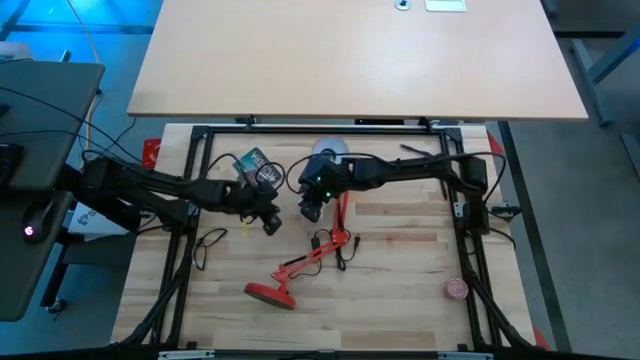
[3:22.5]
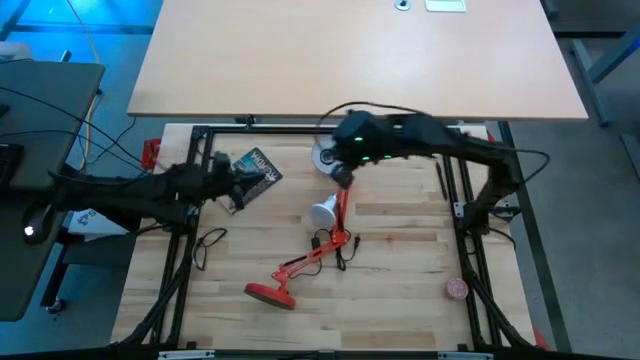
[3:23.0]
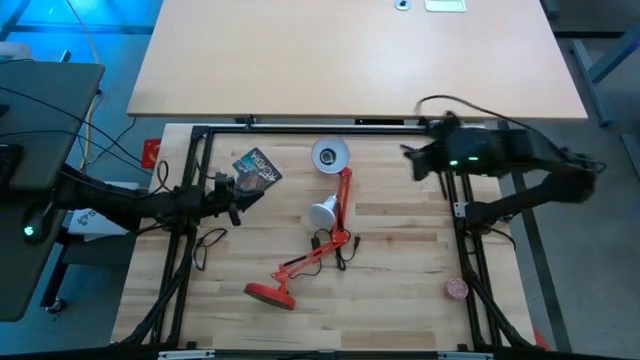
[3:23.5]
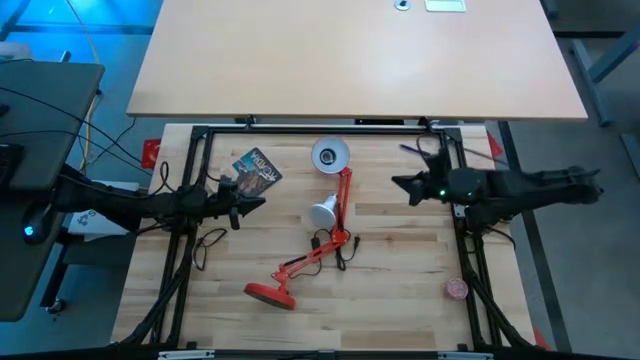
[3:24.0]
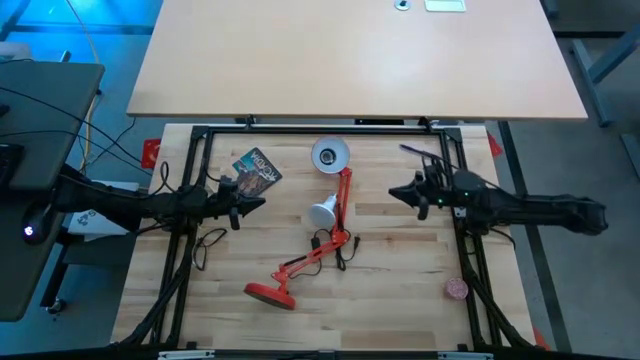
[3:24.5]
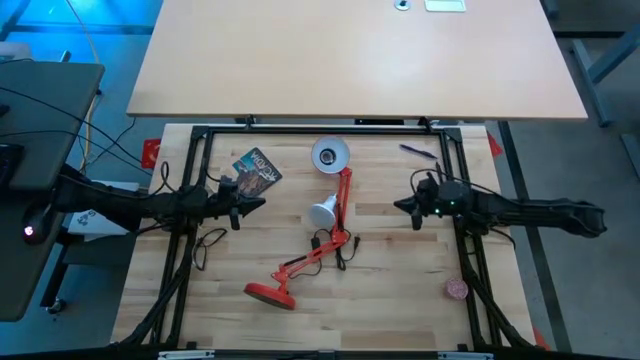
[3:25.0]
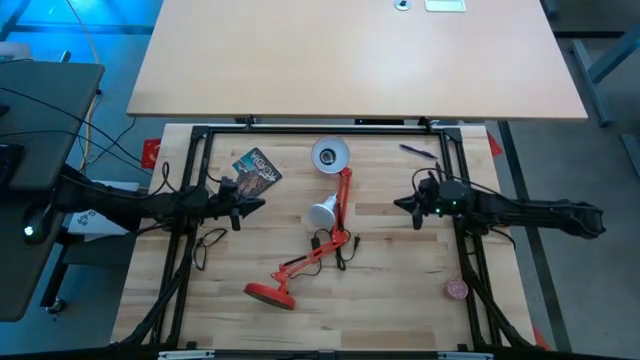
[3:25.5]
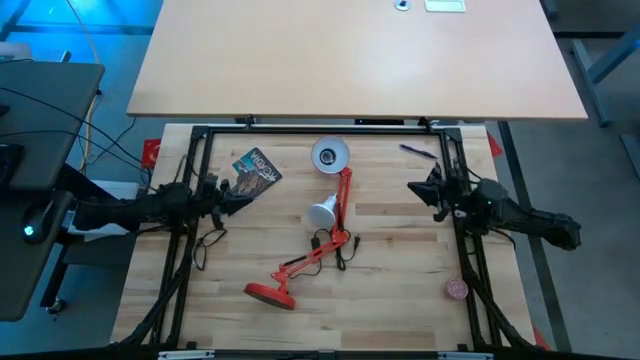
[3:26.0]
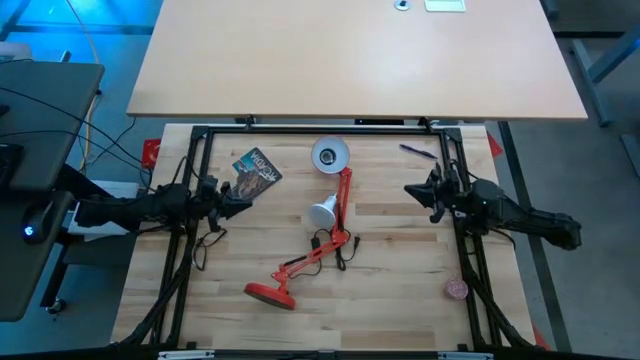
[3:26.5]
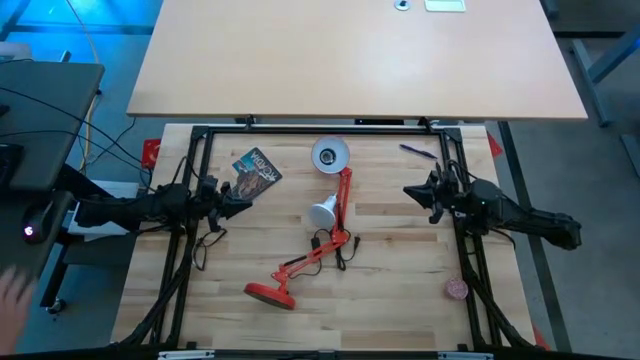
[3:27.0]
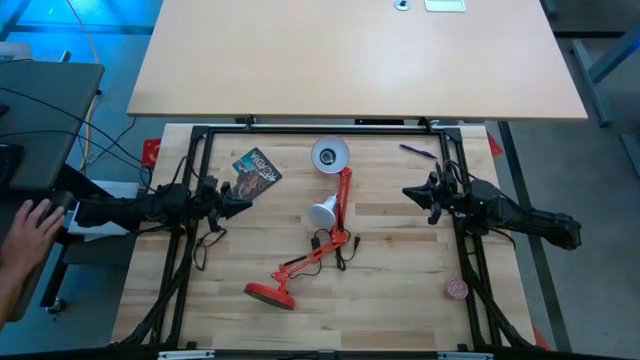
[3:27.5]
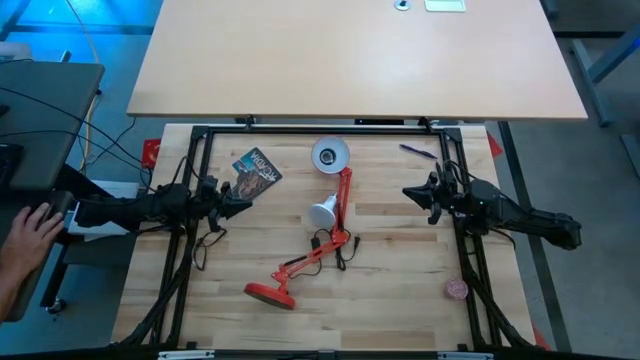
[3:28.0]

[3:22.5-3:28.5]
Task: Screw lightbulb
Return to Home Position

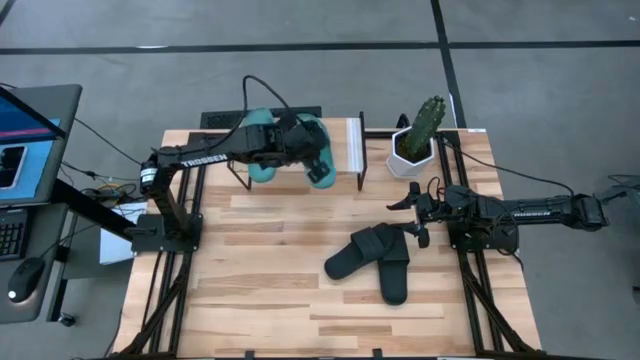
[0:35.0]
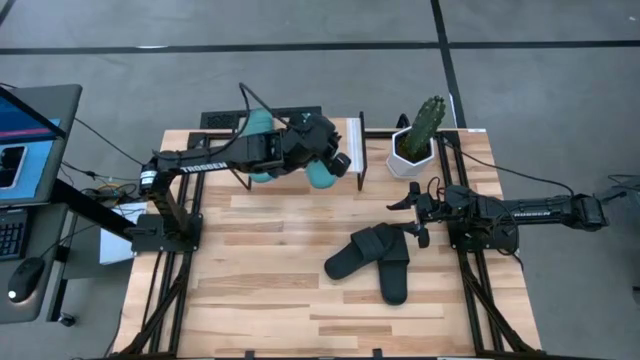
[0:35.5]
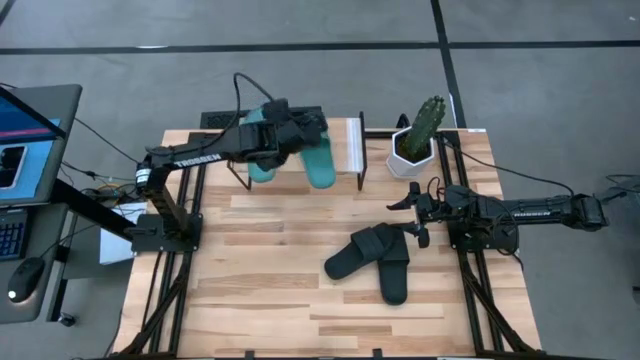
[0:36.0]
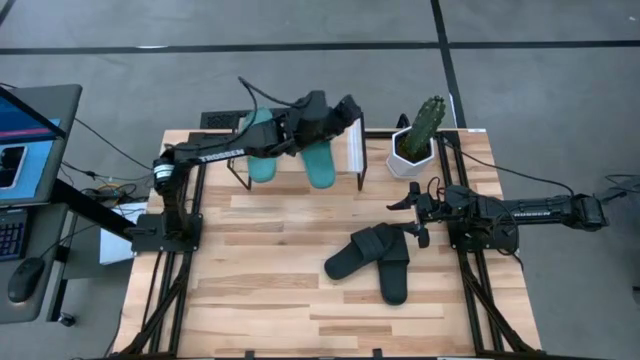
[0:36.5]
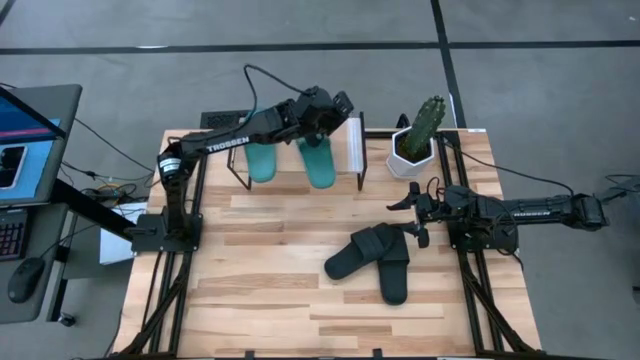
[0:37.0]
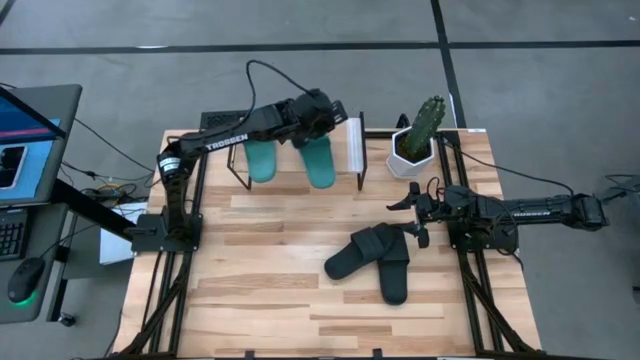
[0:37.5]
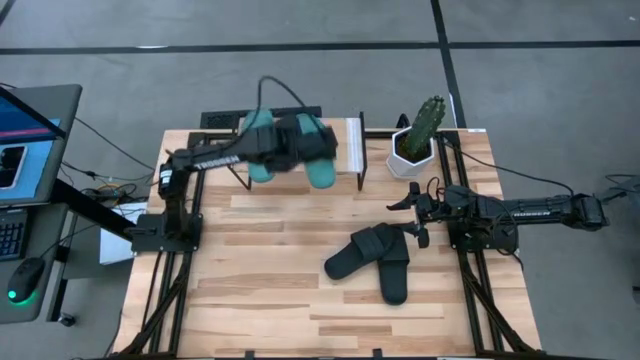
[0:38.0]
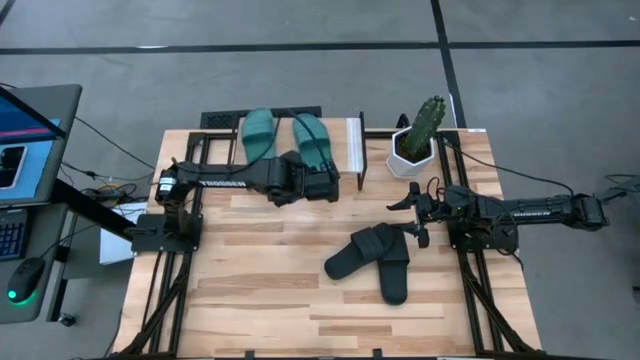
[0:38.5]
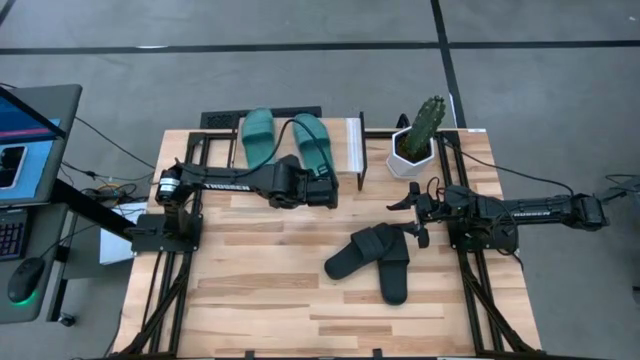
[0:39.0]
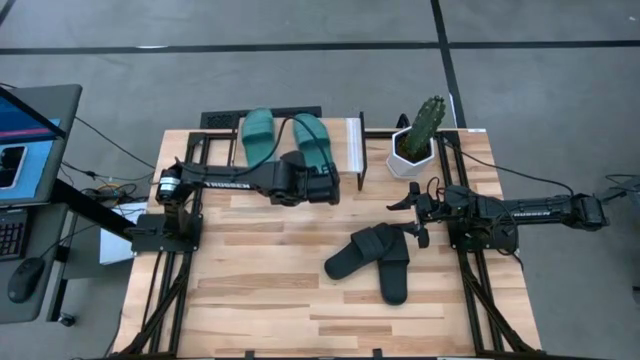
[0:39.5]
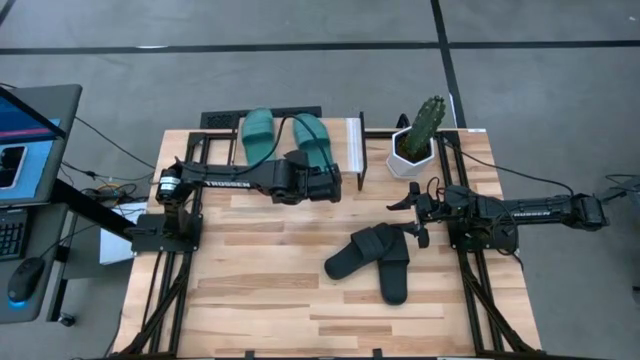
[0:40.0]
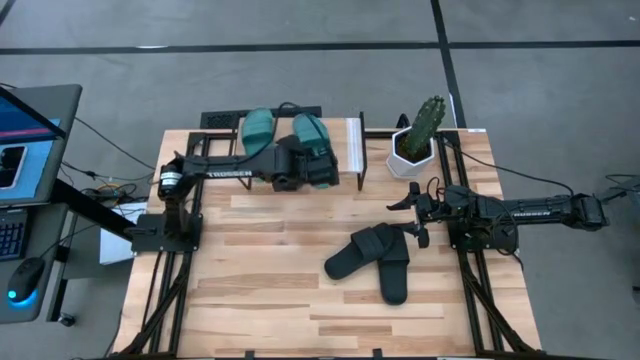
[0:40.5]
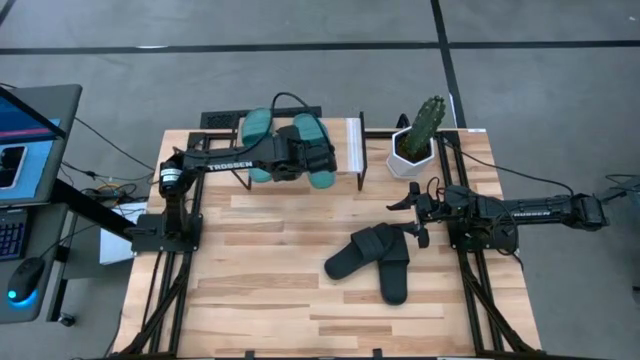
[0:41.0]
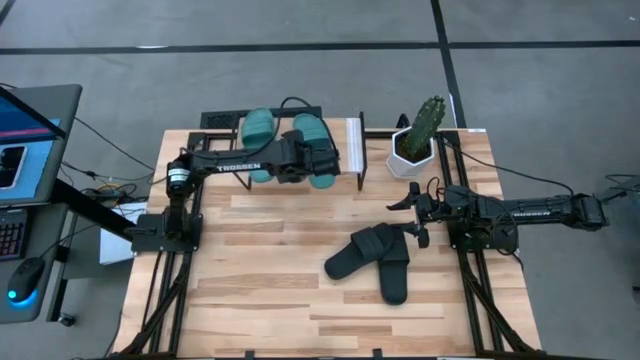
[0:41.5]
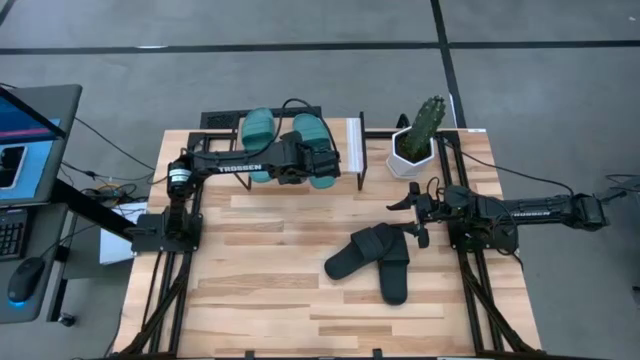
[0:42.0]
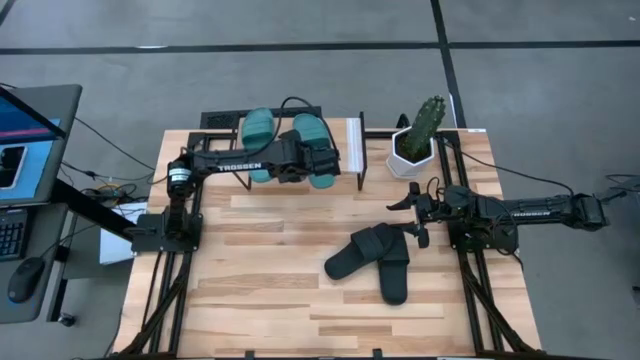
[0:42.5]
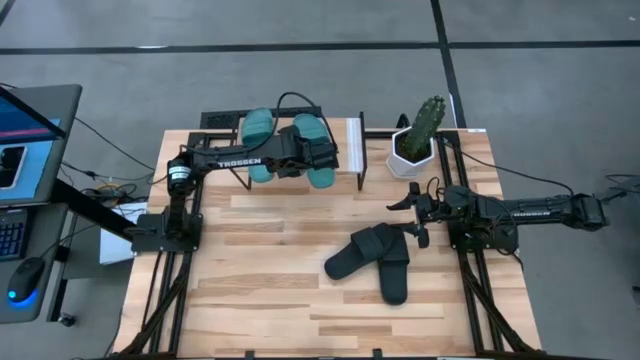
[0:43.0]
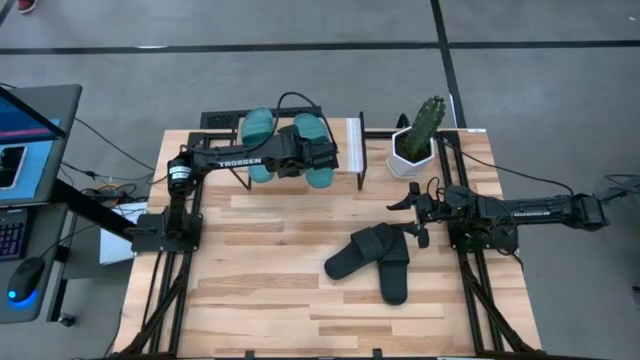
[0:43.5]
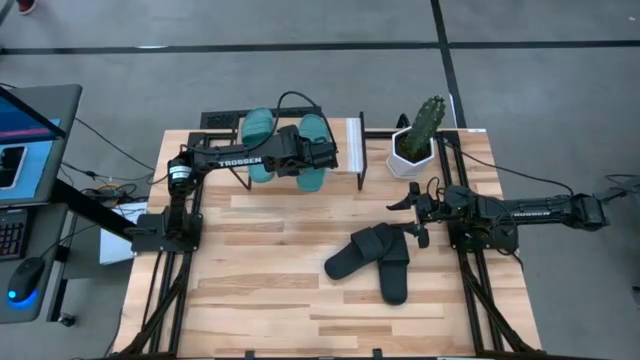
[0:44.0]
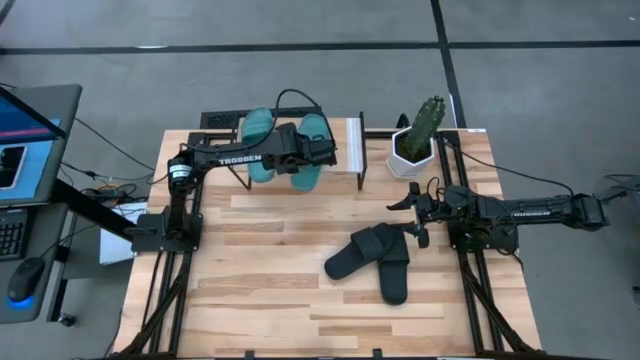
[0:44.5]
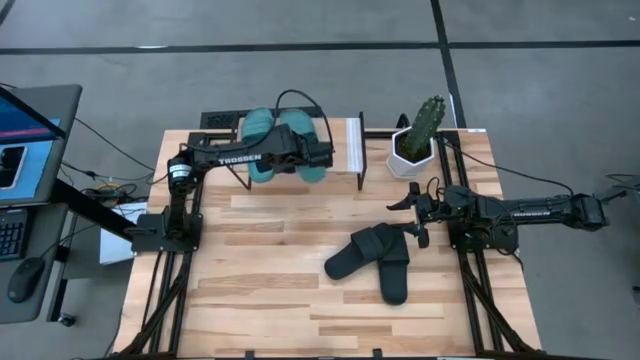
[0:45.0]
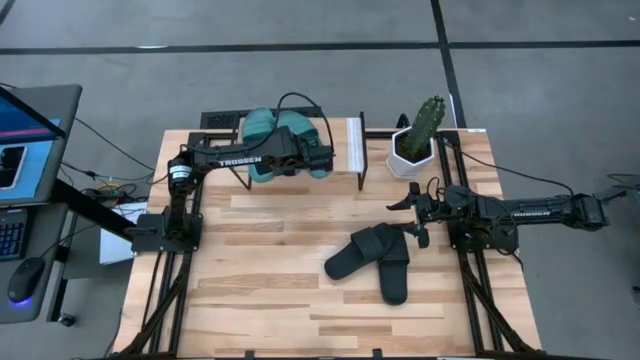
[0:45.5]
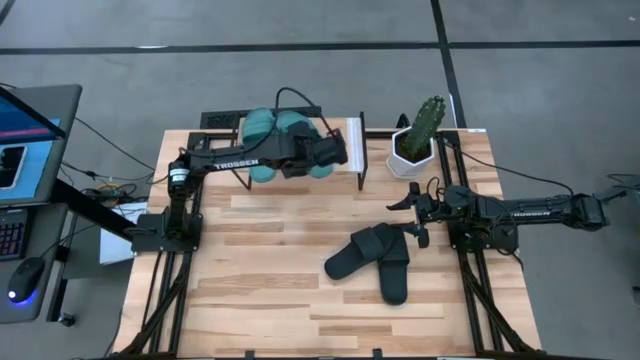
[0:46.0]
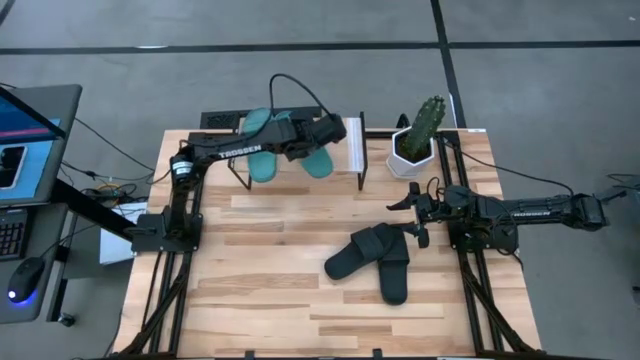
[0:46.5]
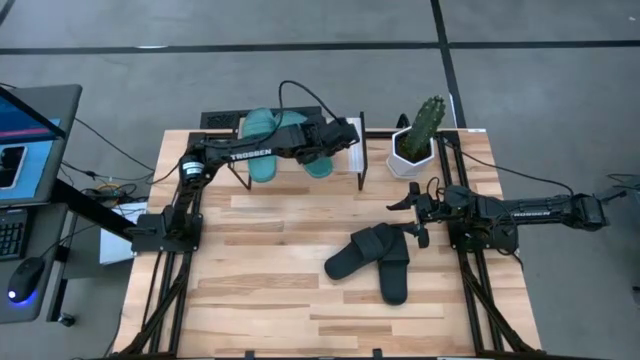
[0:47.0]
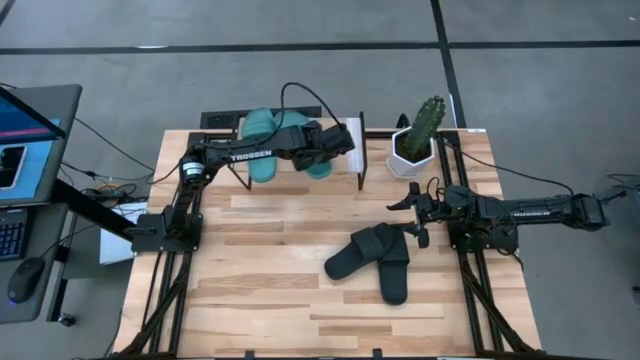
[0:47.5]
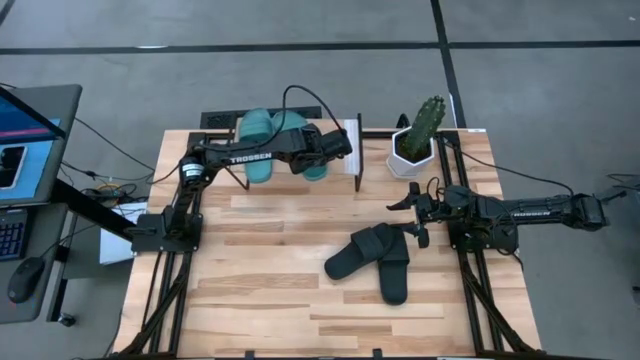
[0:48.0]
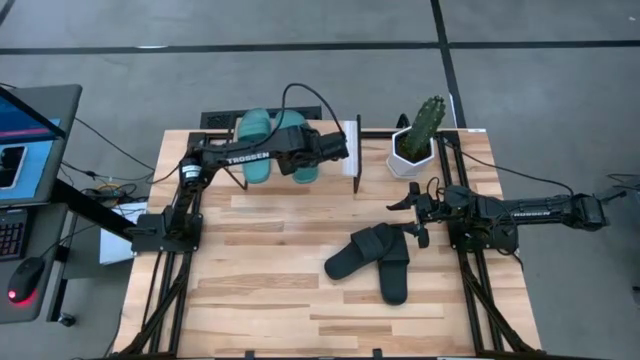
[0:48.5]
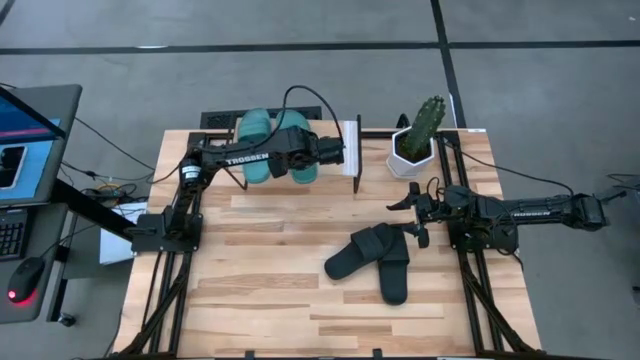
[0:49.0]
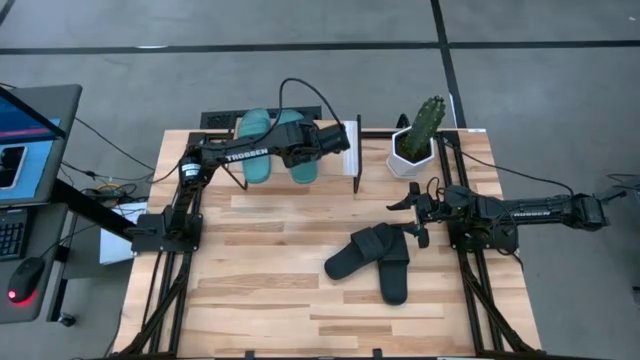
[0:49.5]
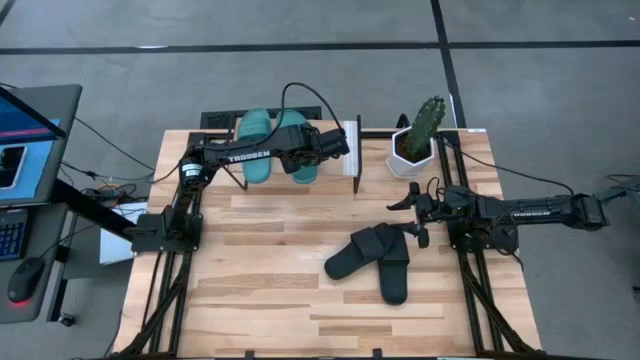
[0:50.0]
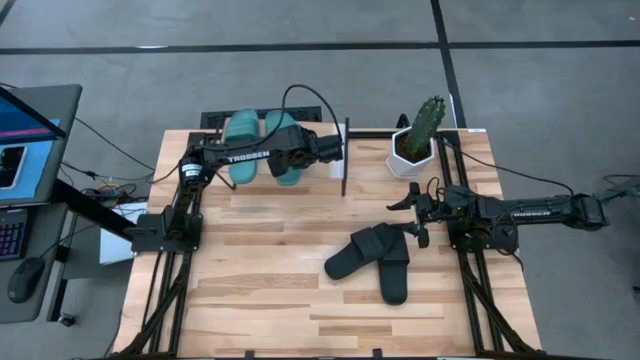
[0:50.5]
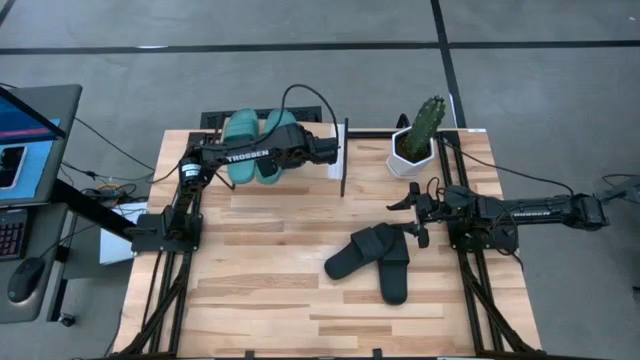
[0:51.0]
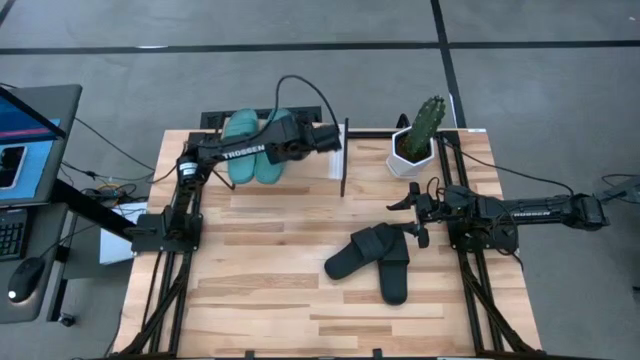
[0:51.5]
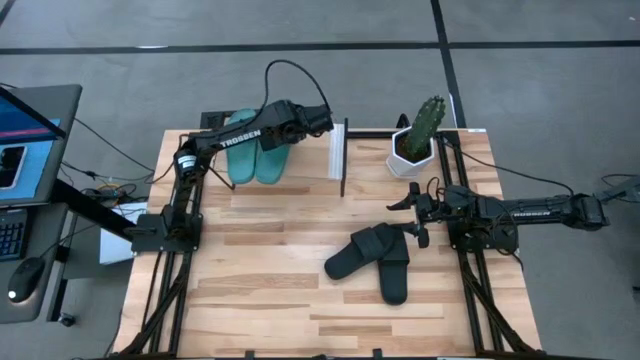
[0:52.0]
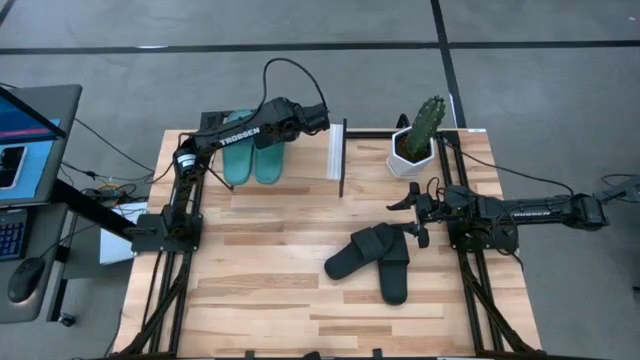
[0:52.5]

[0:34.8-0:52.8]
Task: Pick and place slides into the shelf
Put the light blue slide on the shelf
